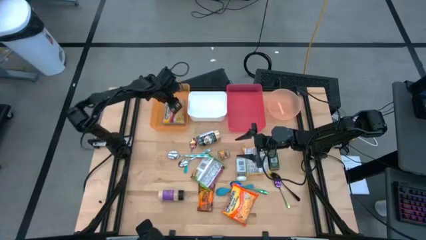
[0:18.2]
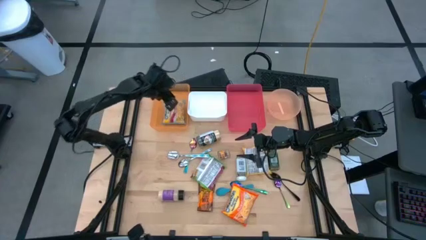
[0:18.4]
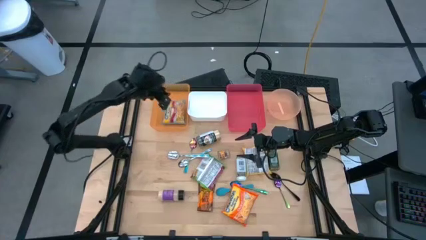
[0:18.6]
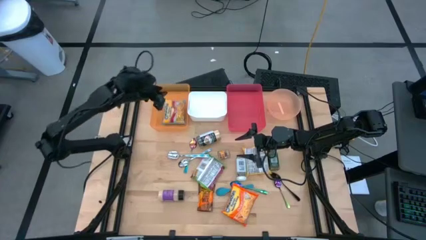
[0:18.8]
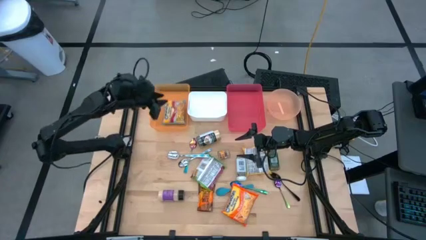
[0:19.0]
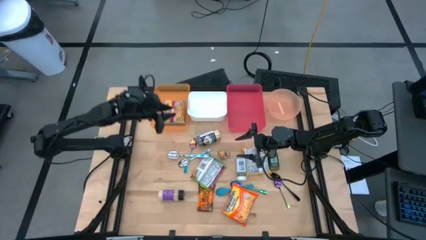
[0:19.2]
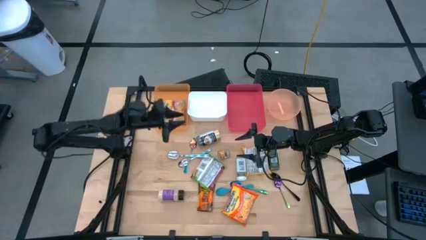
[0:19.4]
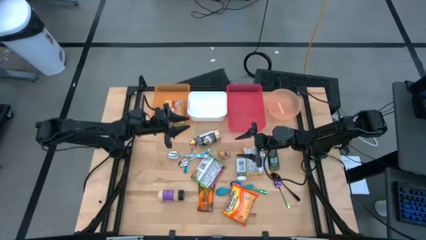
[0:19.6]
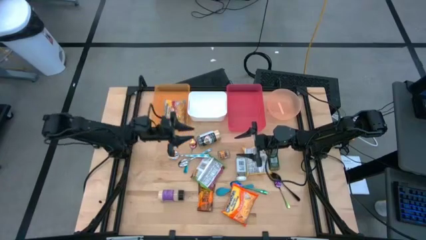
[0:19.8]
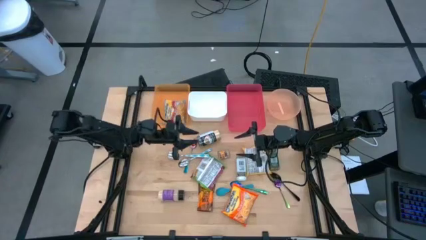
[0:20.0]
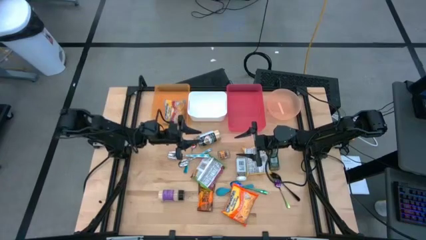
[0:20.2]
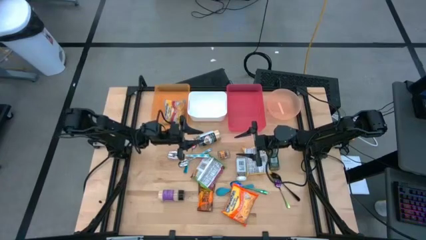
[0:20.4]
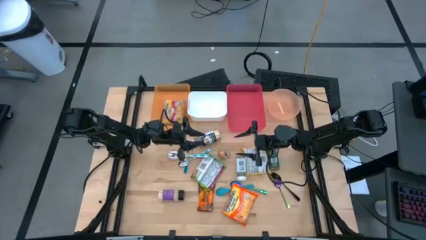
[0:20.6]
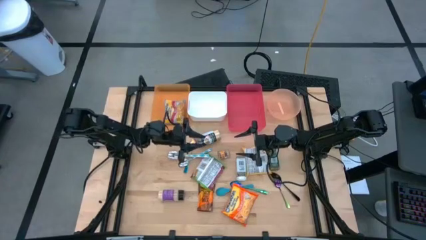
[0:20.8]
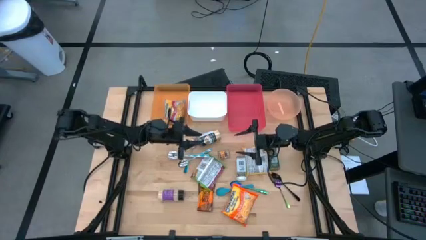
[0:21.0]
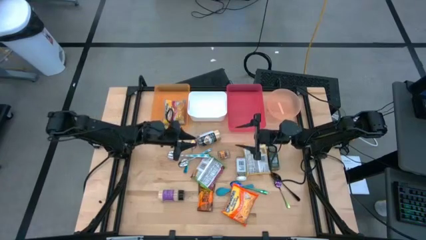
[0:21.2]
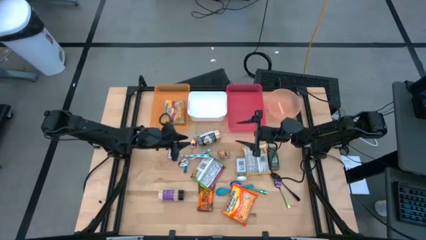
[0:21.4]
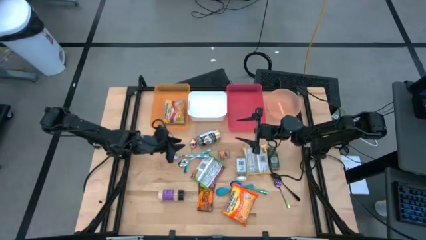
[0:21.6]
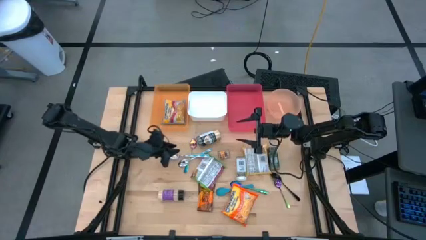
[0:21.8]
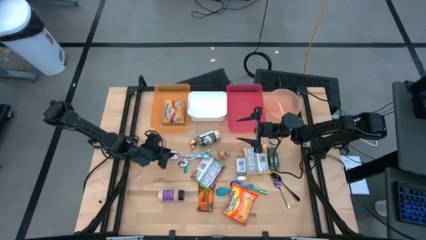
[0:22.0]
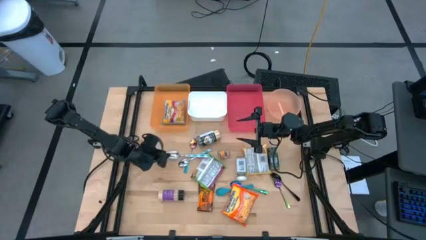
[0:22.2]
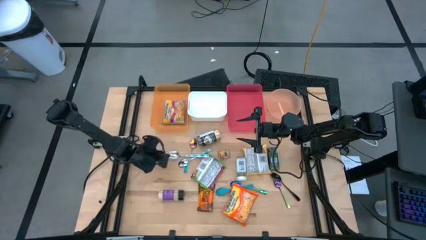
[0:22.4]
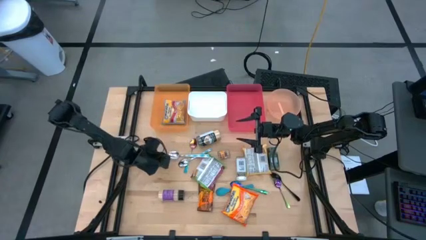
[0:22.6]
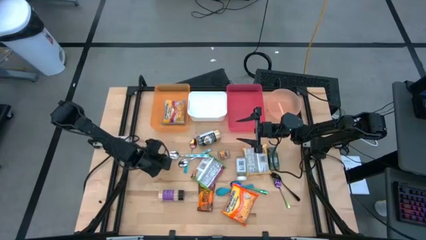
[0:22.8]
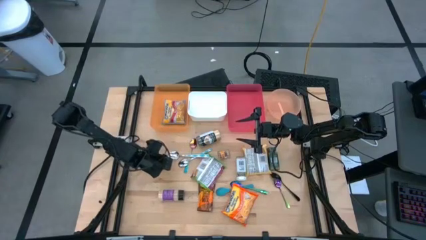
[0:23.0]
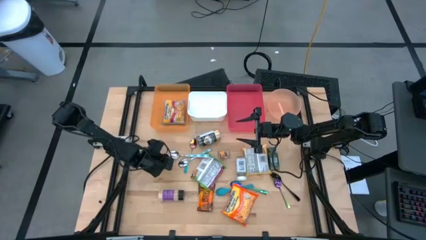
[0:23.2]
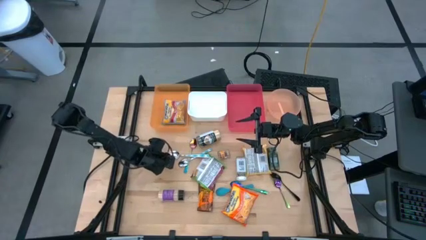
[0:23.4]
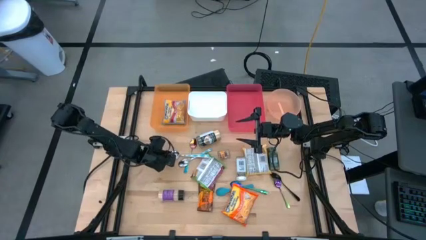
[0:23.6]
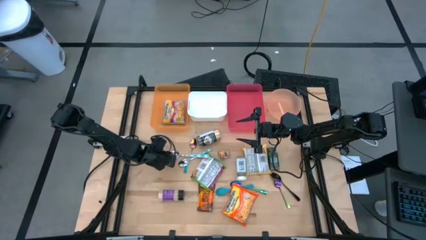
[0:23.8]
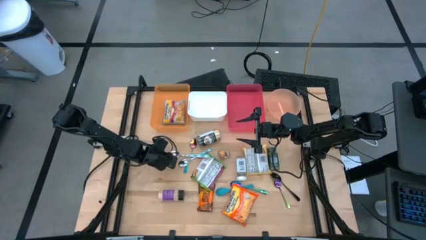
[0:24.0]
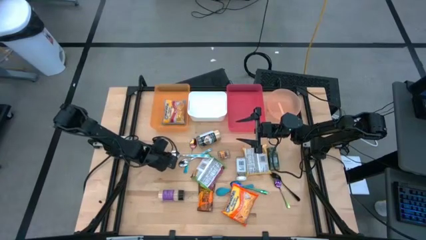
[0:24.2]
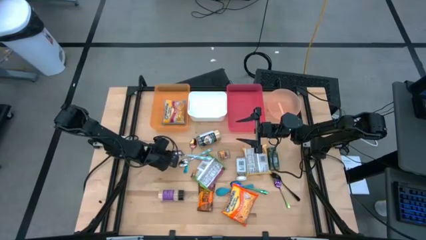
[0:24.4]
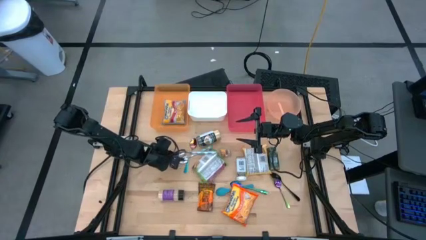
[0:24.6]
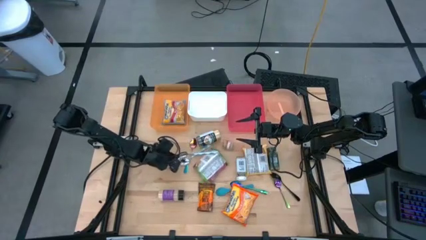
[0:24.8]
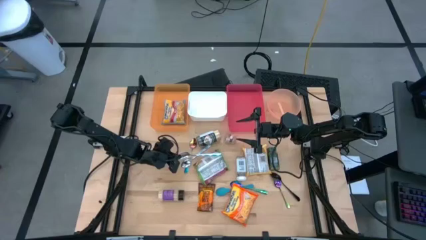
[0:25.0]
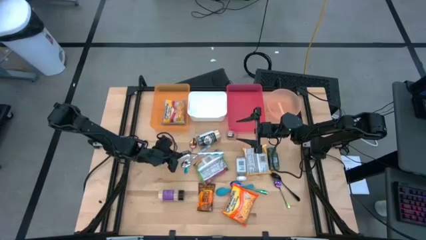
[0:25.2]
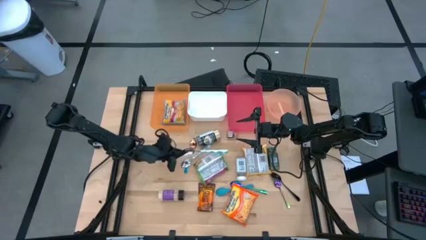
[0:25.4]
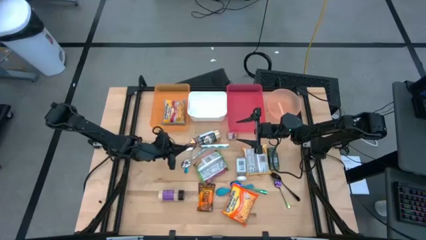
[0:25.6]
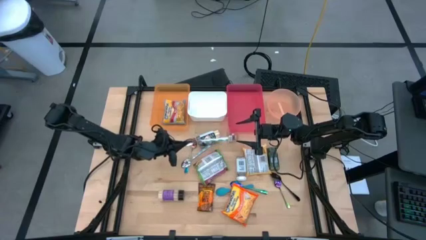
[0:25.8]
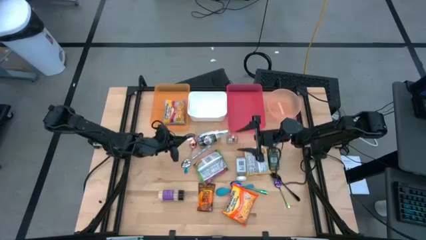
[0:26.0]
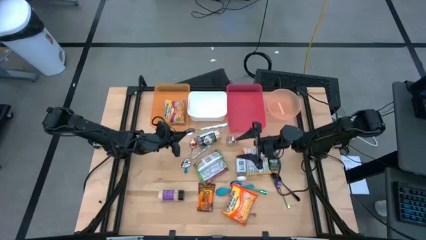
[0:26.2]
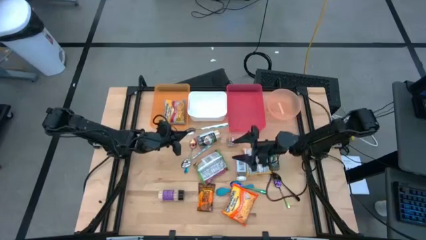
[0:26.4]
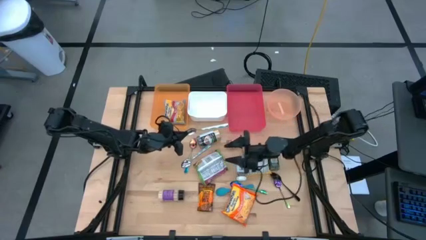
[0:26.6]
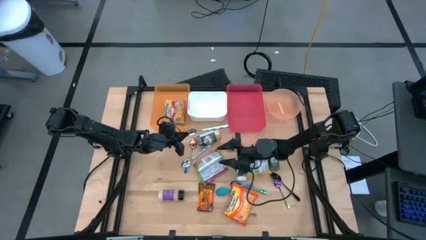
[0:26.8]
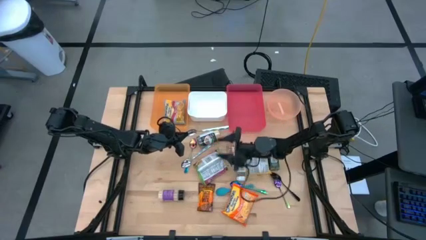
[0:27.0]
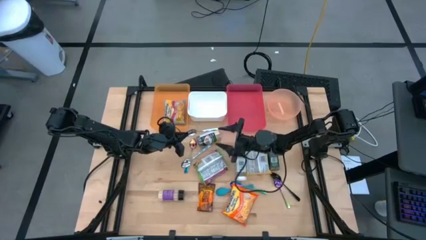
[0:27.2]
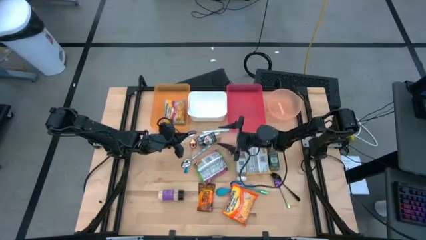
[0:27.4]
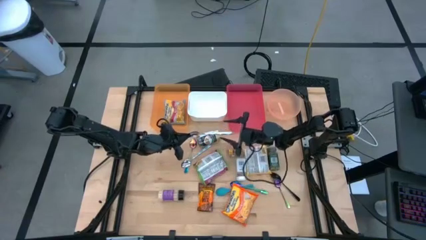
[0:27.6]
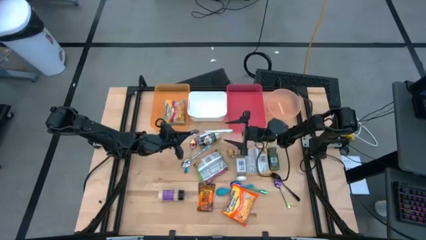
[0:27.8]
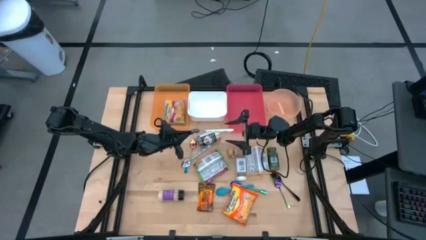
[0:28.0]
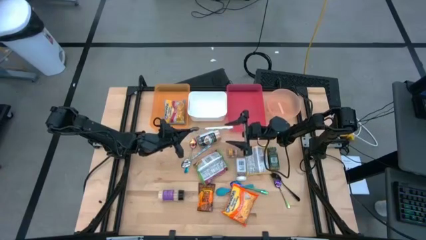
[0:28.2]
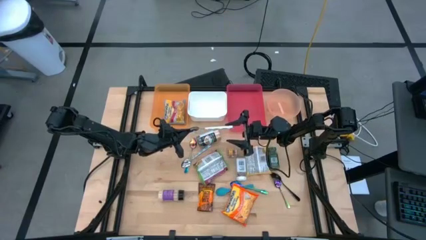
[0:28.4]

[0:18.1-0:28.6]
Task: Pick & Place Food Item
Put the top blue patterned spoon into the white bin
